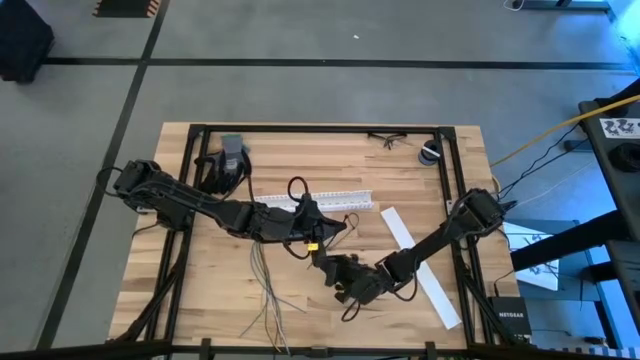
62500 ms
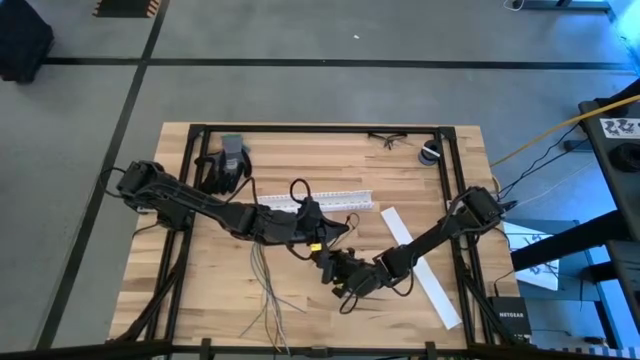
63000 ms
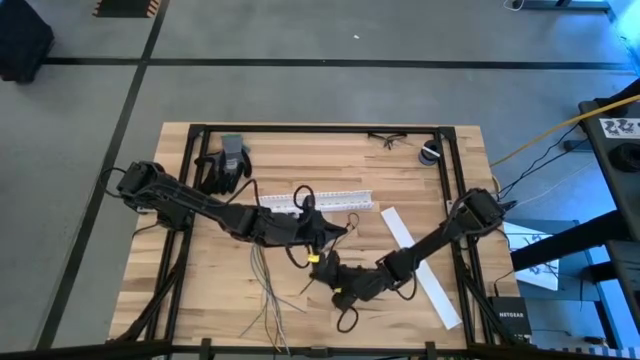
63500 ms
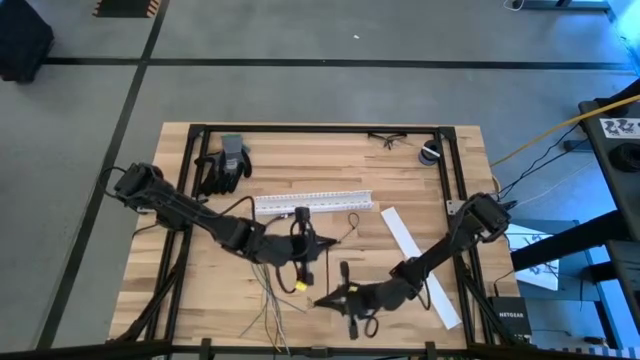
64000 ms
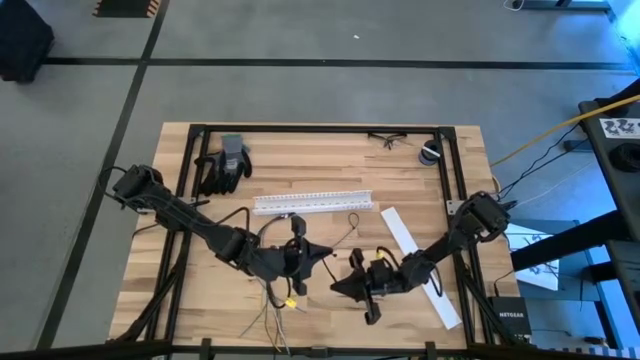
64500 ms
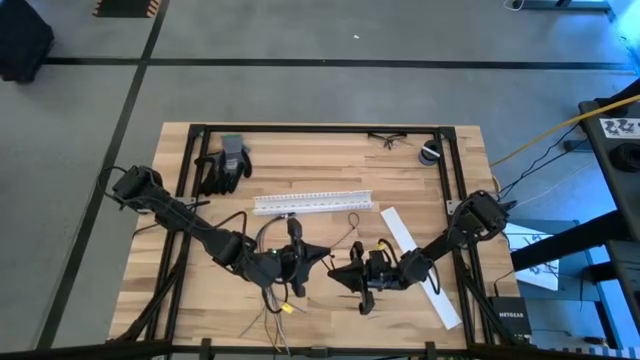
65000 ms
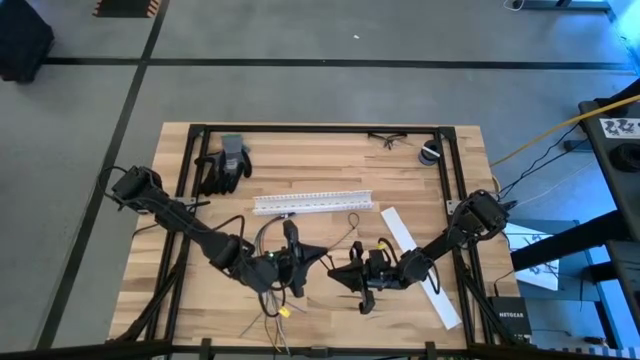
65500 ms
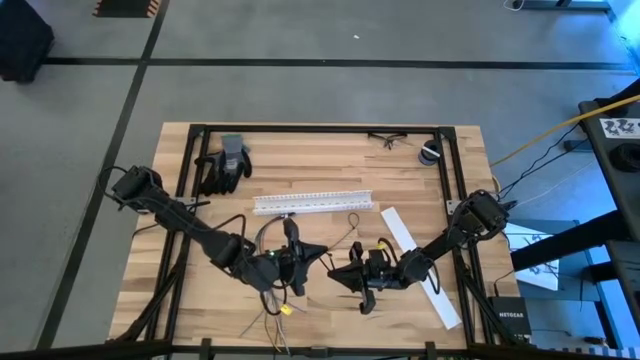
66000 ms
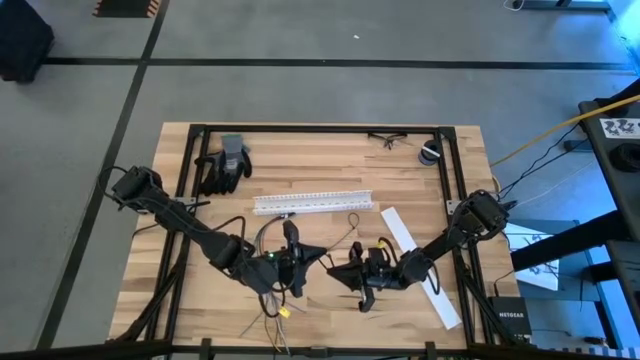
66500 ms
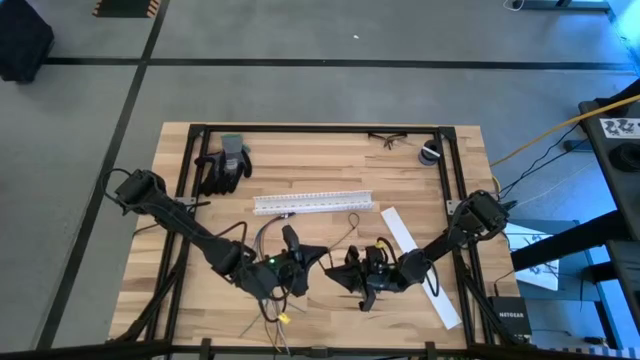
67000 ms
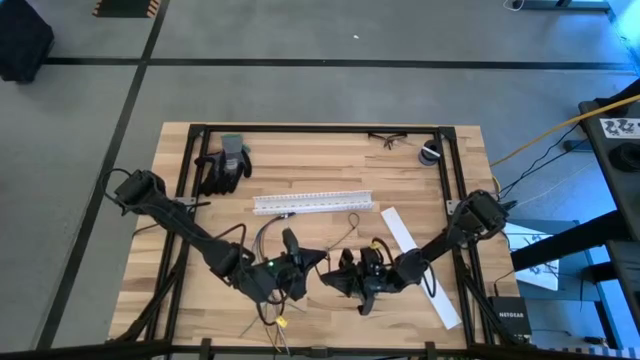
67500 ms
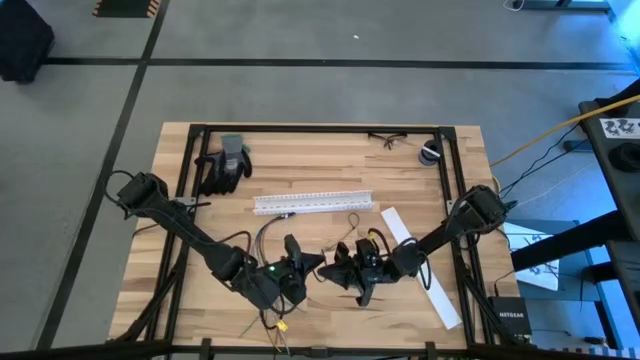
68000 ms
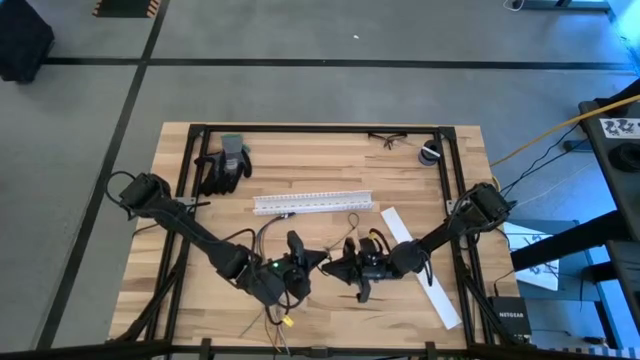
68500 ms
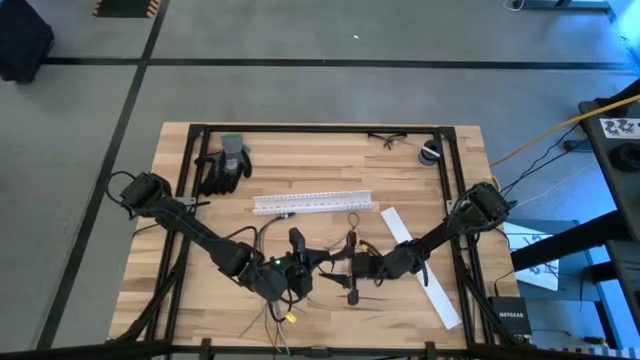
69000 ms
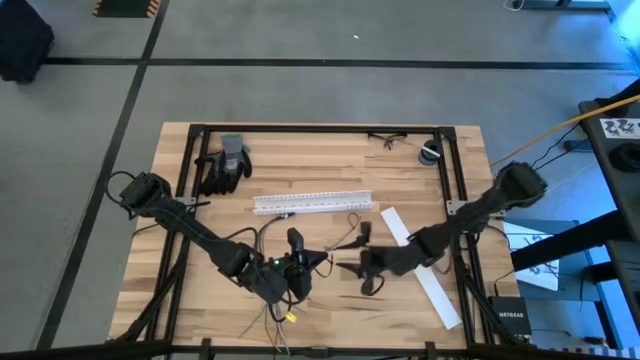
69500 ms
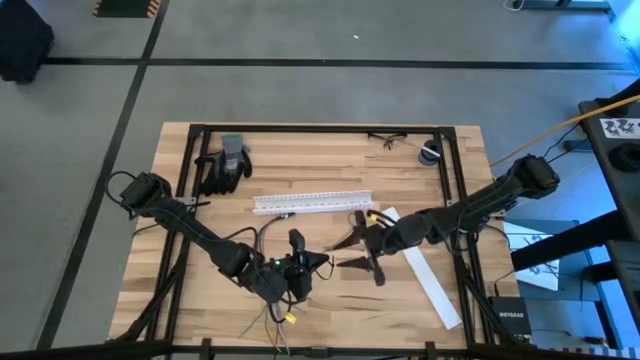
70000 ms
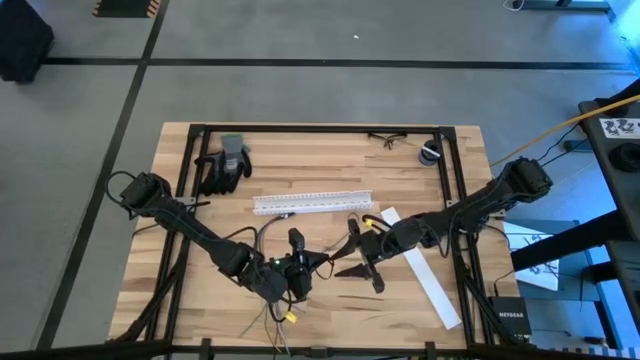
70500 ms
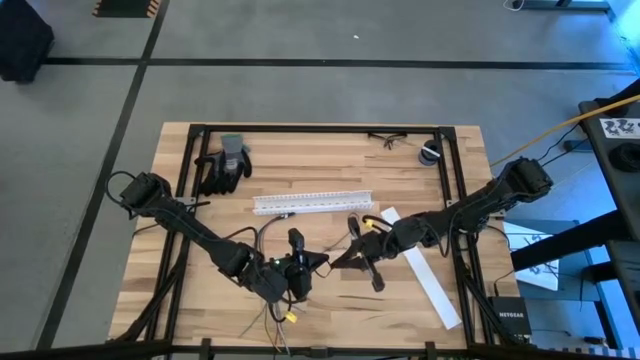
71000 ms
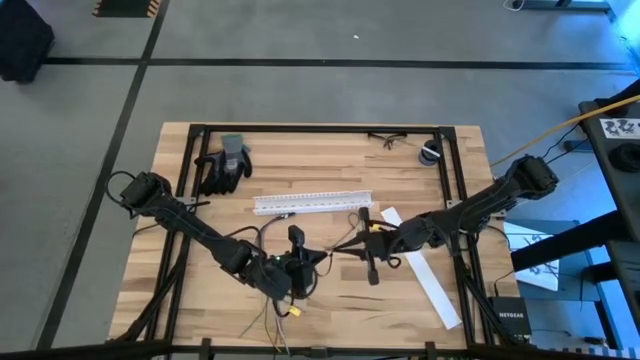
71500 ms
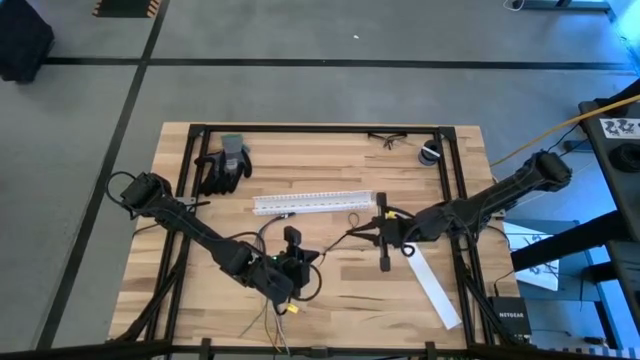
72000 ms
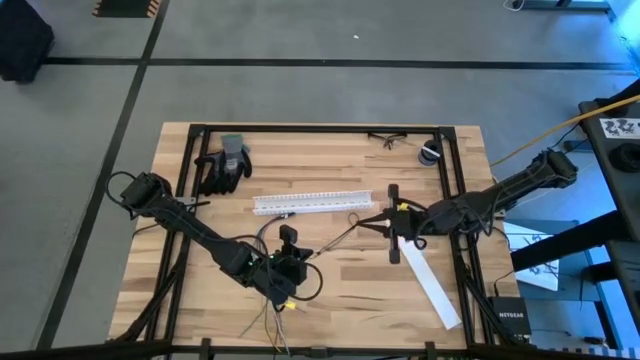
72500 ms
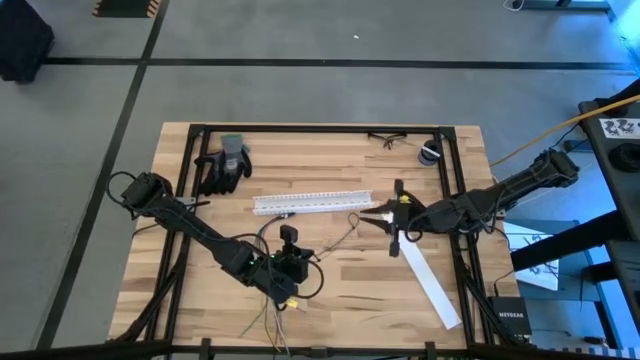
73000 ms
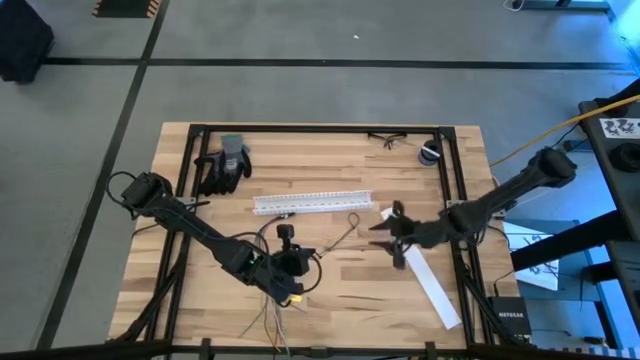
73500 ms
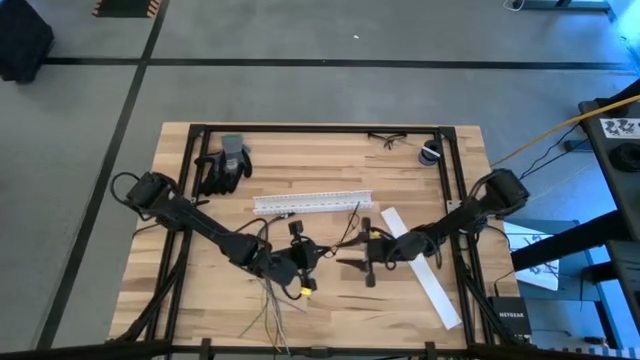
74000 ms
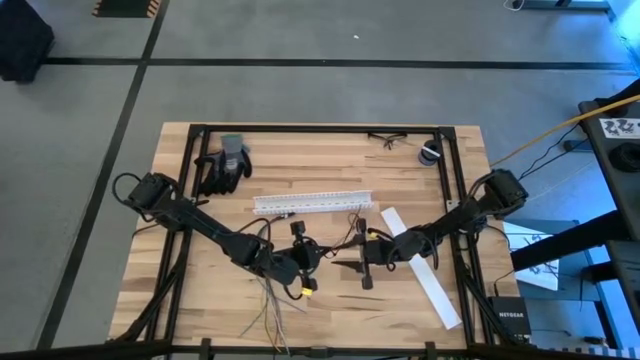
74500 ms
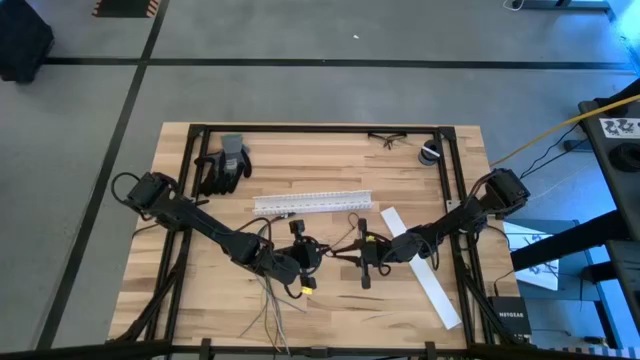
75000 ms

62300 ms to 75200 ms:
Task: Ziptie cables
Prepare the black ziptie

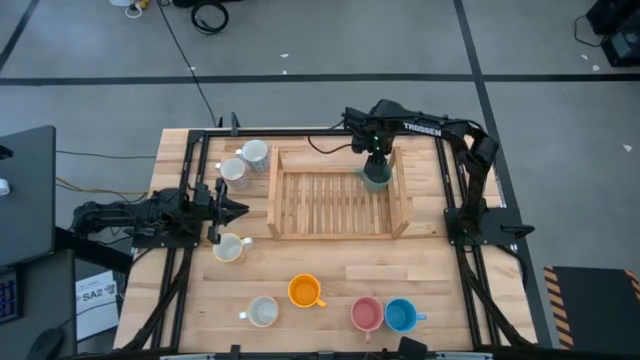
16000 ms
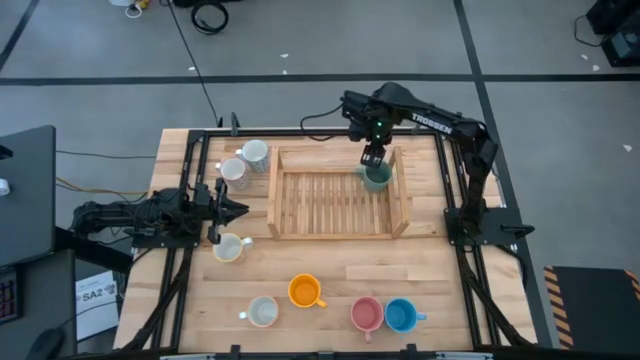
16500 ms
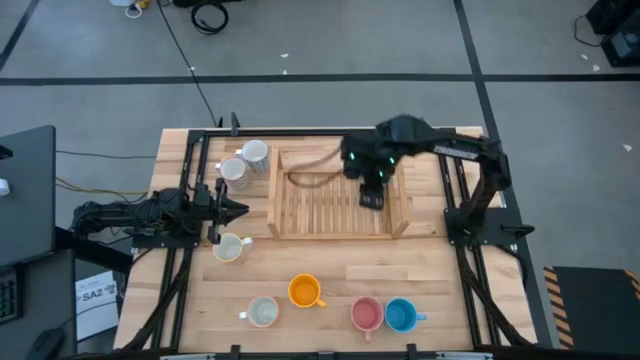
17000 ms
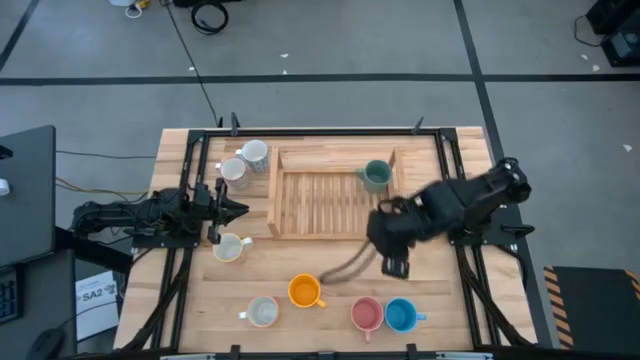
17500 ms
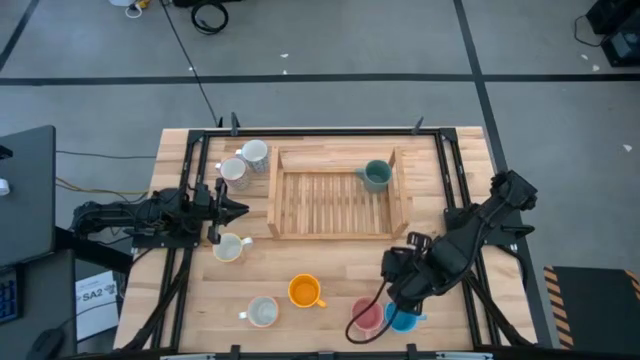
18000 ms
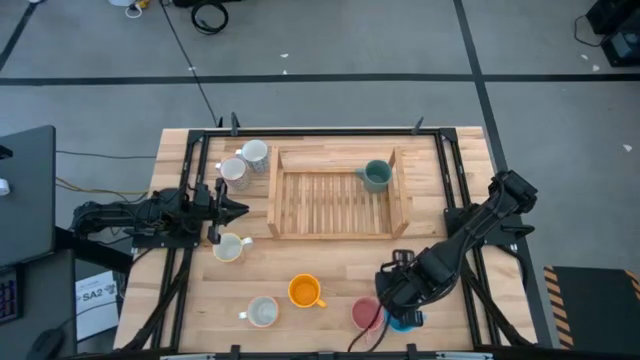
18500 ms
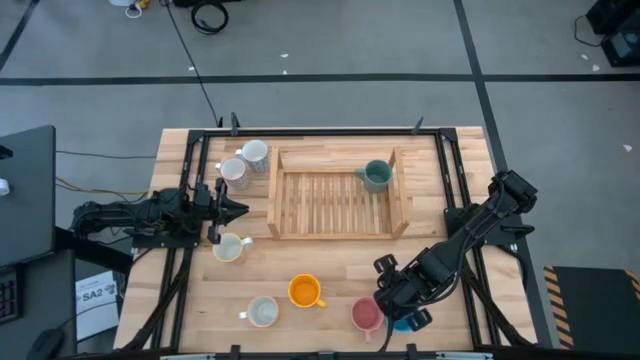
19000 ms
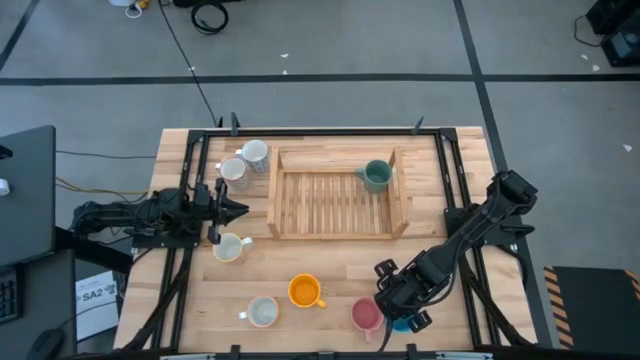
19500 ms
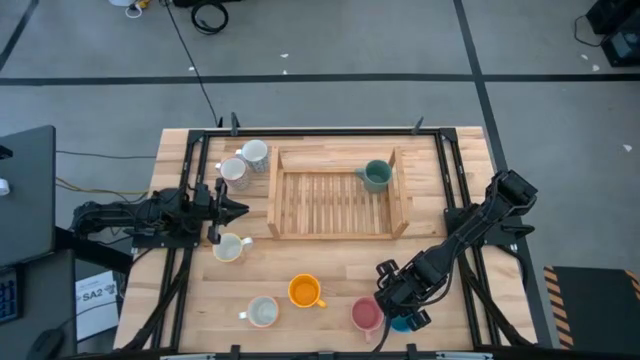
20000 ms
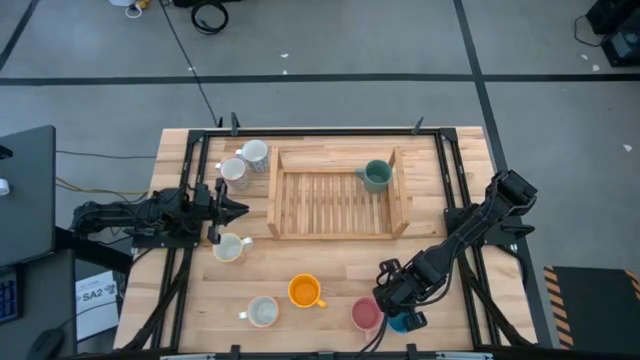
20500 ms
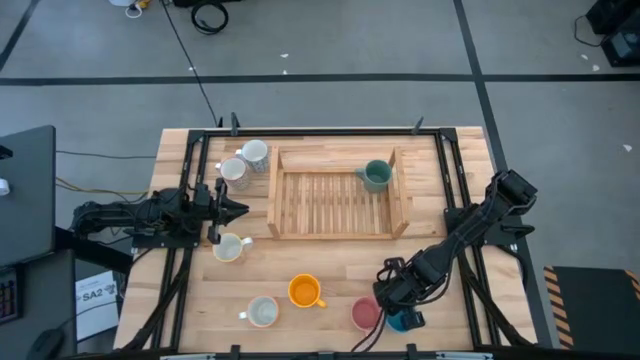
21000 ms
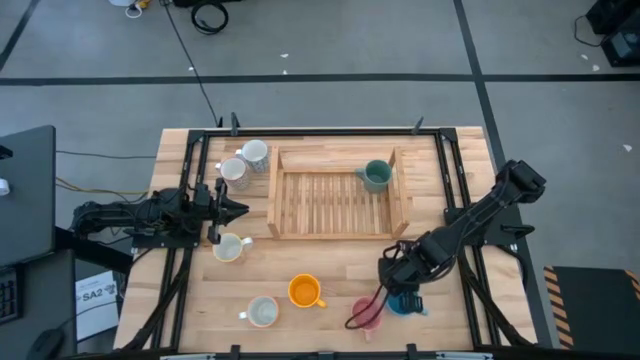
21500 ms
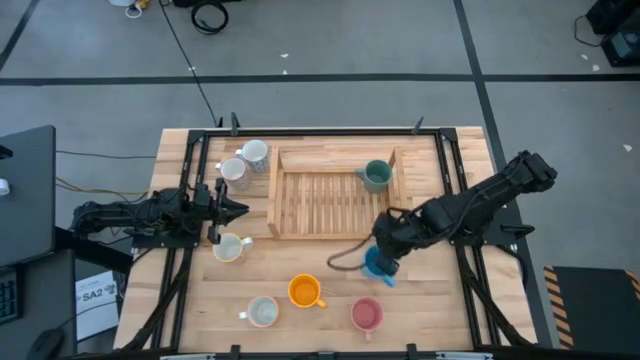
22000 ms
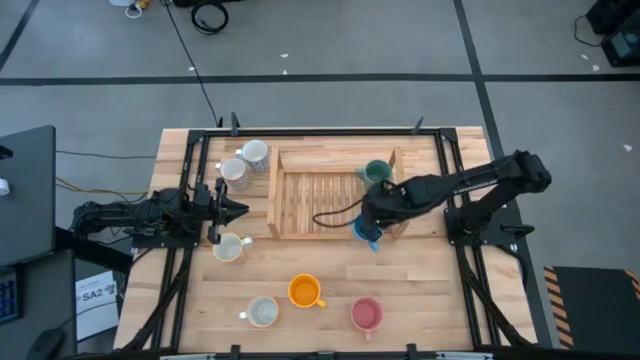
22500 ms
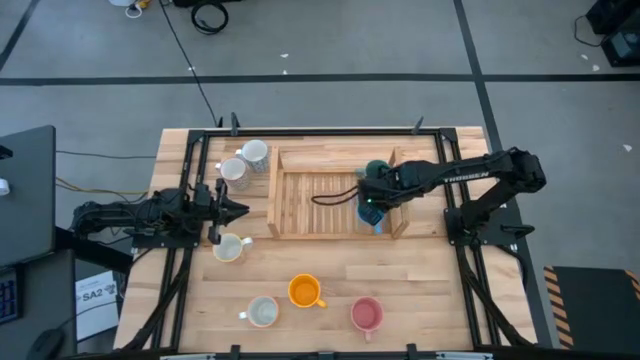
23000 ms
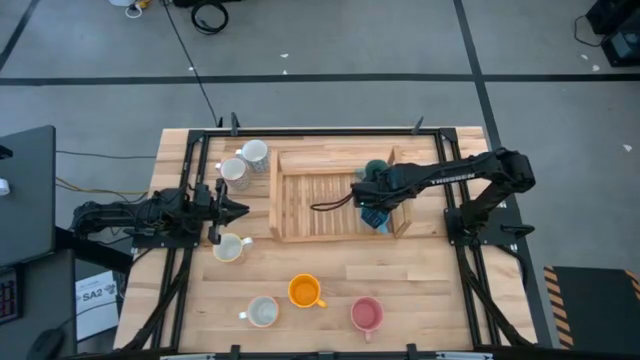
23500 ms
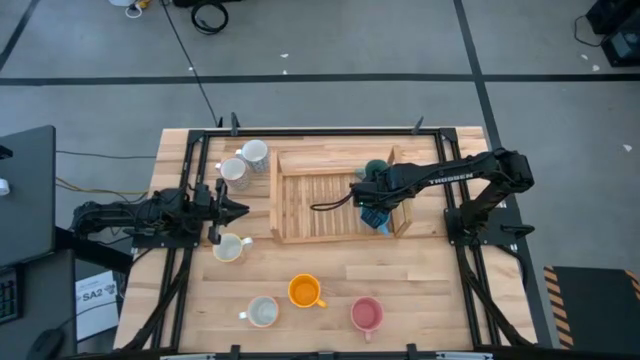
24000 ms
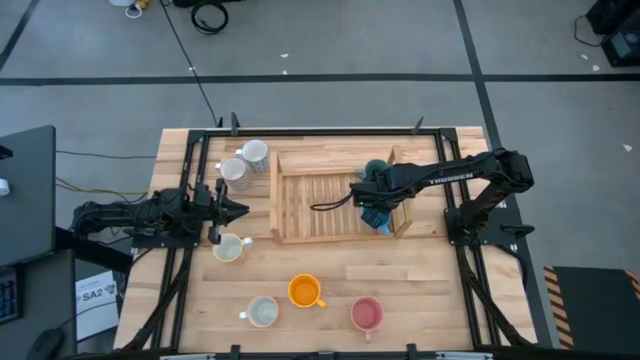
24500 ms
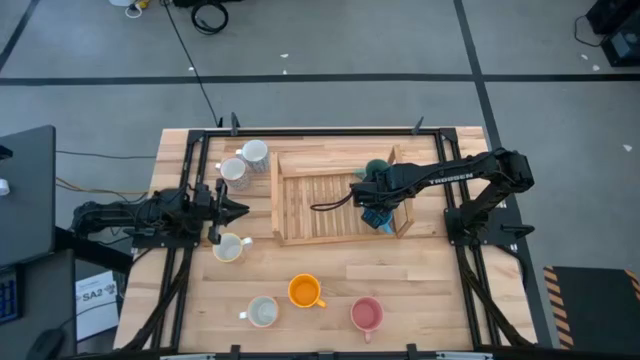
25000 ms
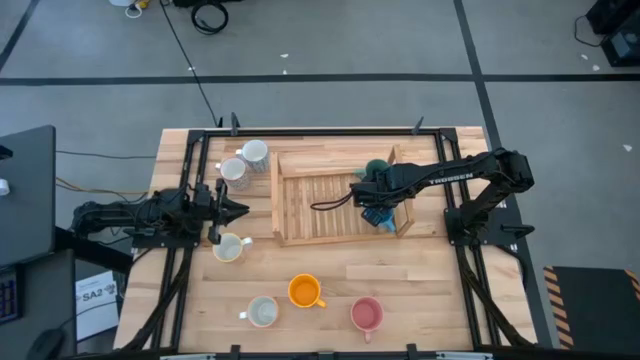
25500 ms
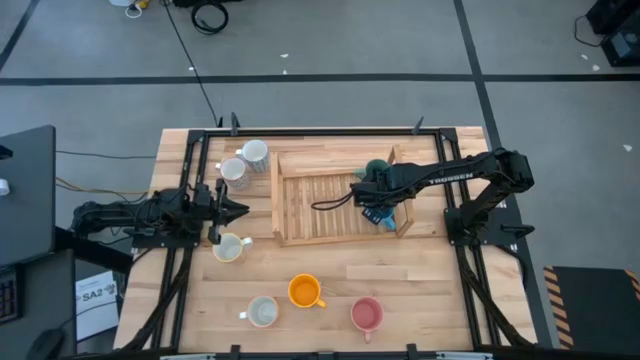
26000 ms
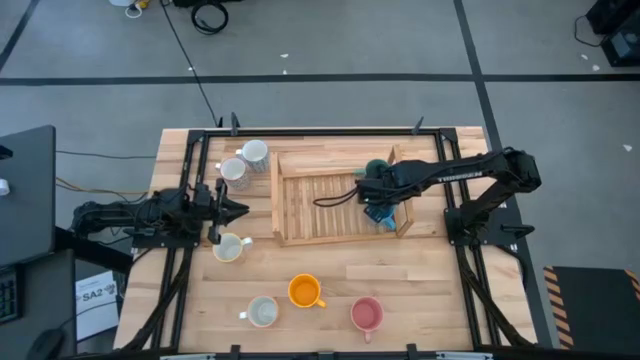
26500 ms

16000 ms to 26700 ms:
Task: Place coffee mugs
Put the bottom blue cup on the shelf aligned with the green cup
